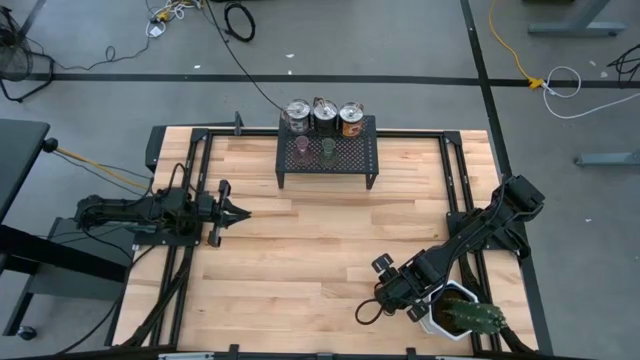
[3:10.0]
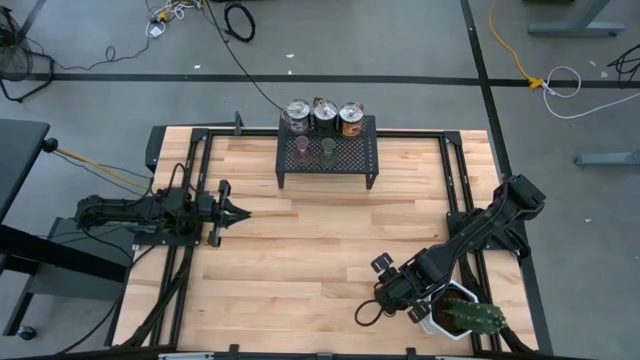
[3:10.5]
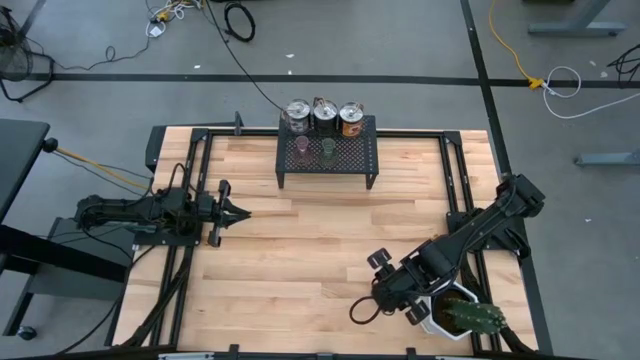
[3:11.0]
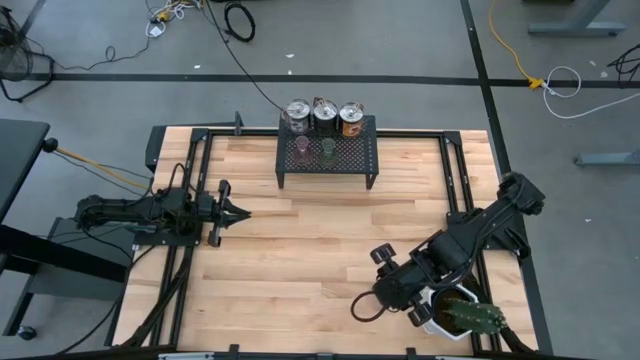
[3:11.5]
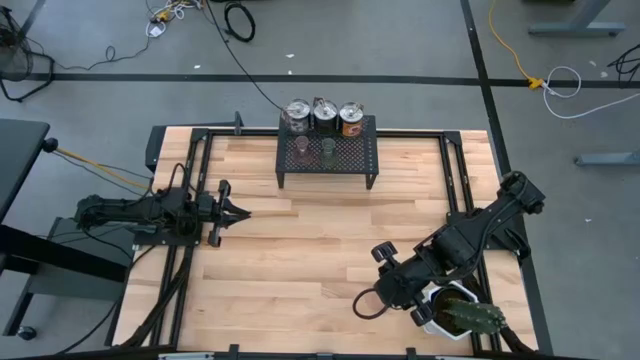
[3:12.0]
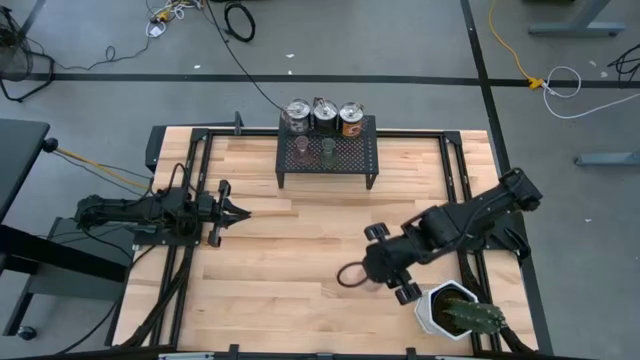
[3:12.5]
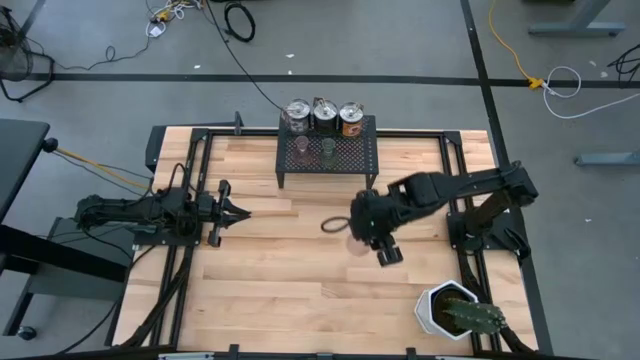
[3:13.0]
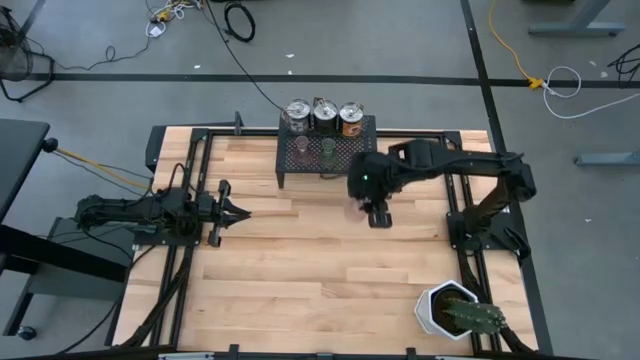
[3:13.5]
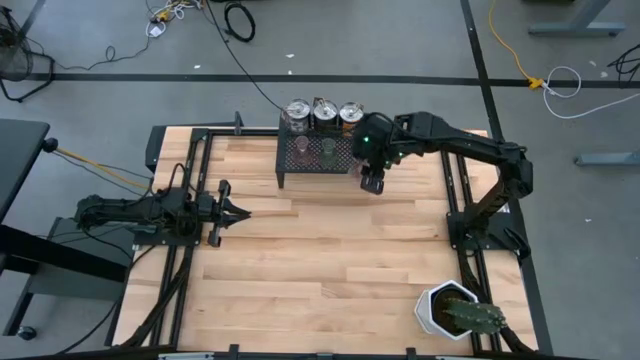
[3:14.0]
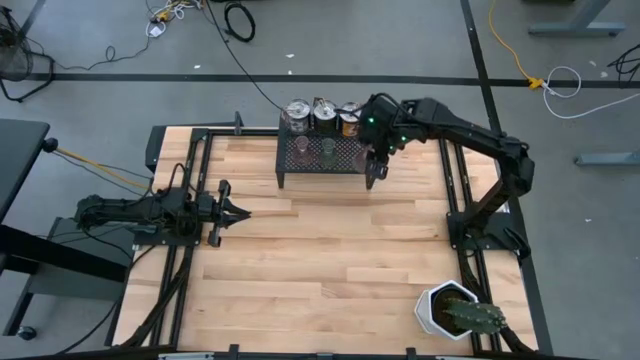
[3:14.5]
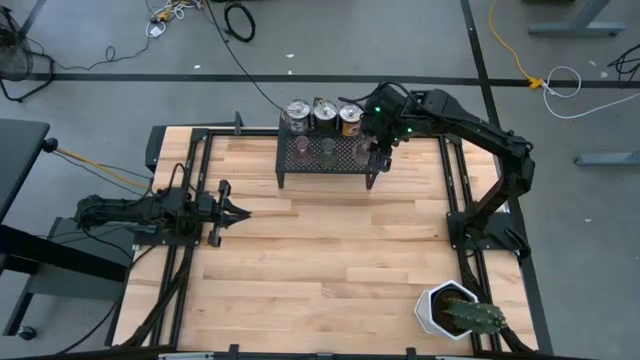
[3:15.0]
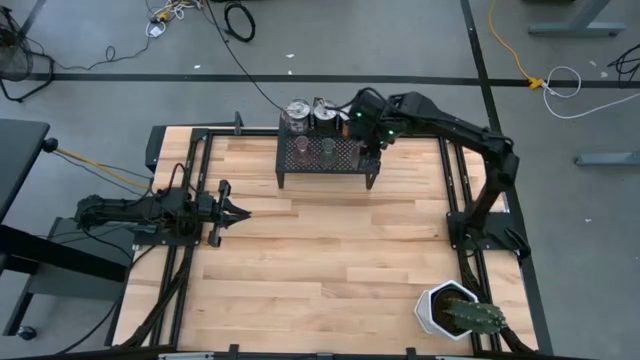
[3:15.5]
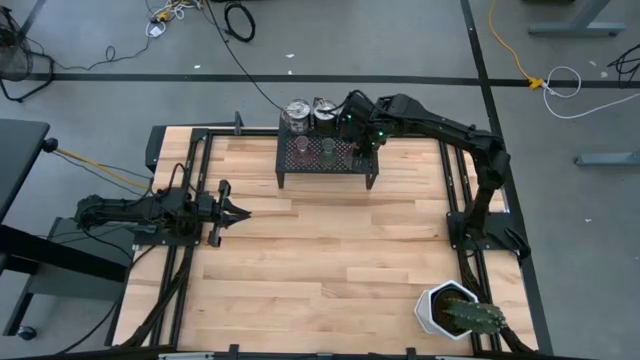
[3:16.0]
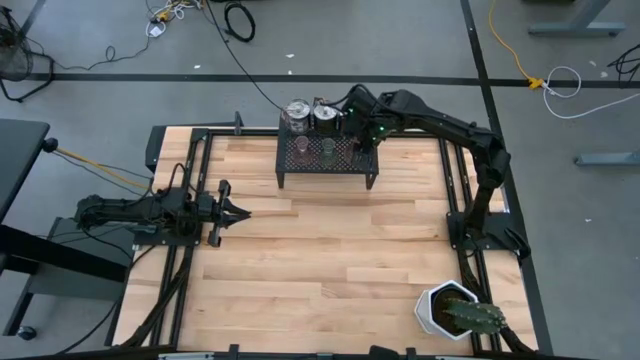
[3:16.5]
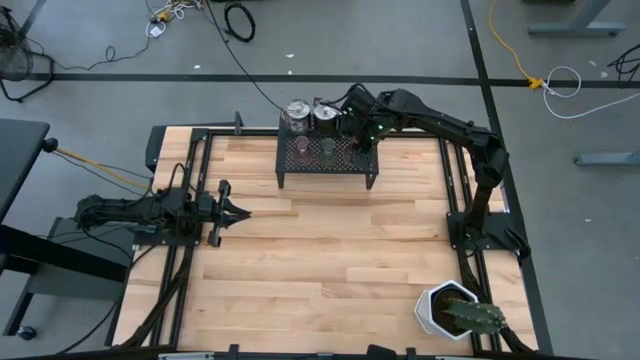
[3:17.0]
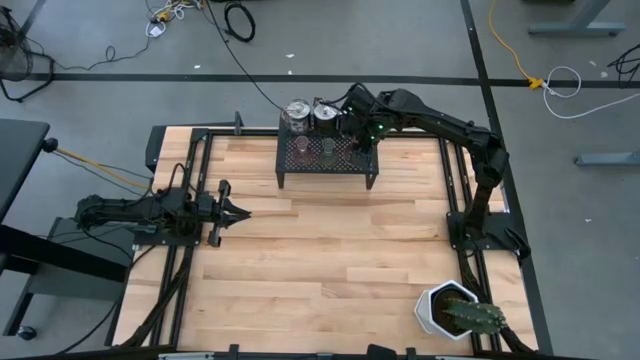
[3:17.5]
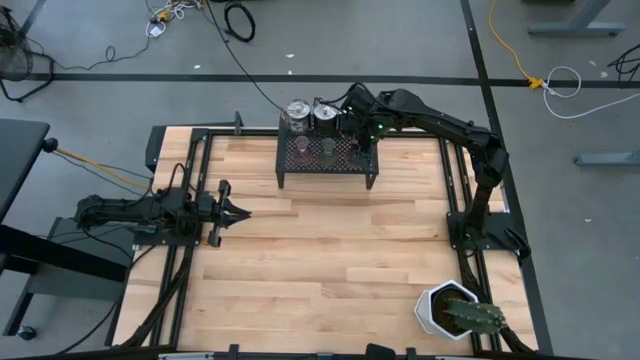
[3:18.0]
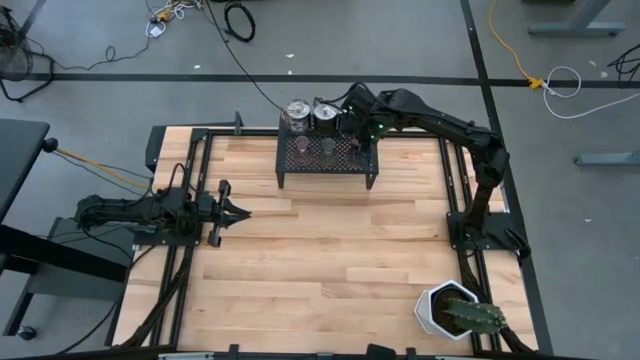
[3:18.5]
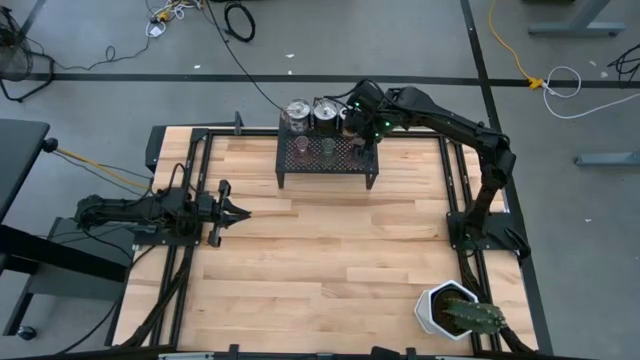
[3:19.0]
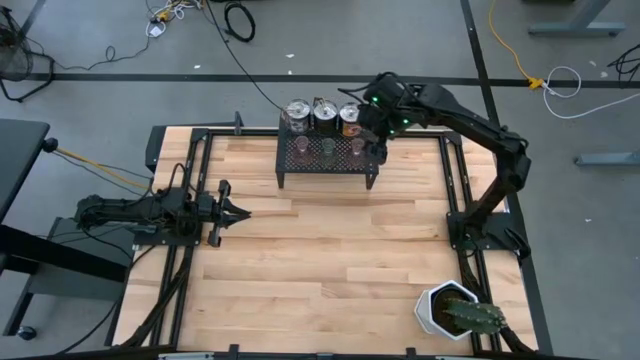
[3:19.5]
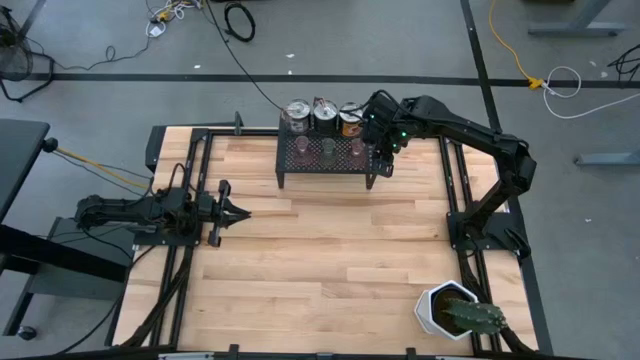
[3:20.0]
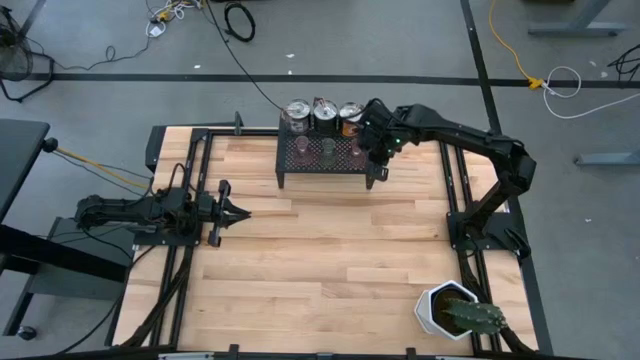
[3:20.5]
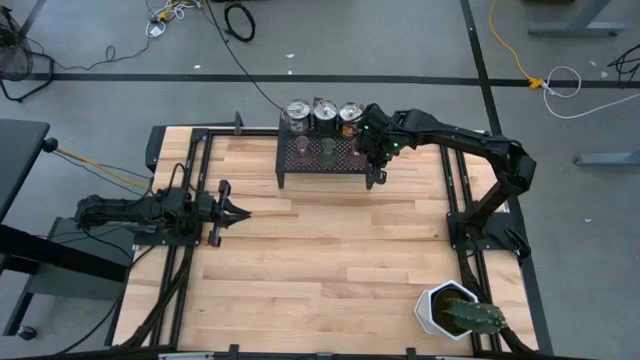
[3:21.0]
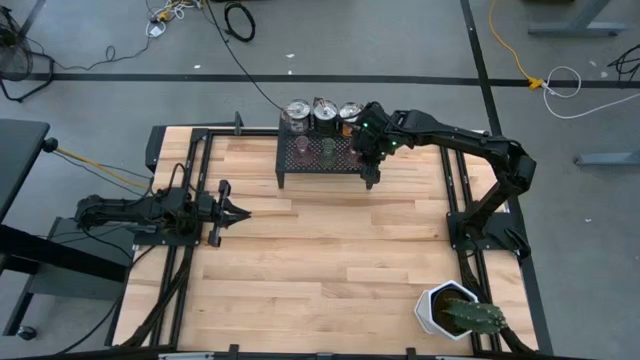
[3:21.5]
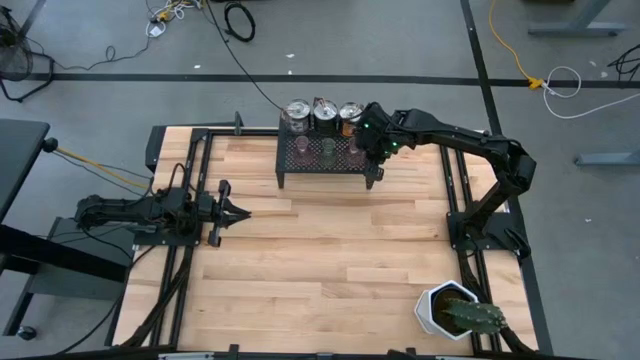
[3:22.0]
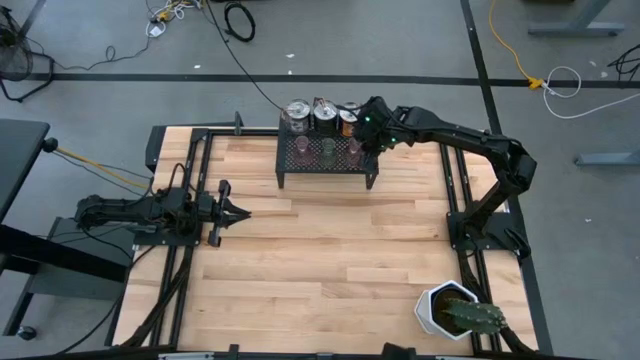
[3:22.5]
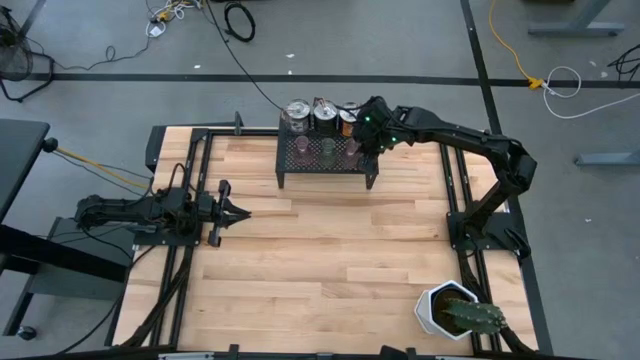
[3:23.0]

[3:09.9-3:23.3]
Task: Pick & Place candle stick holders
Put the pink vase candle holder on the shelf

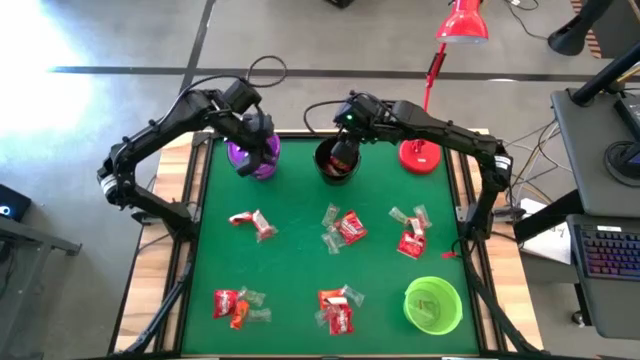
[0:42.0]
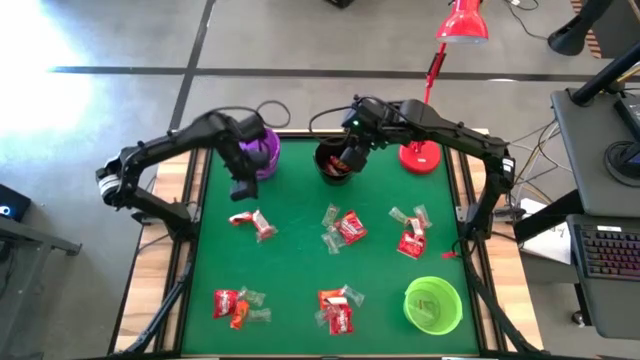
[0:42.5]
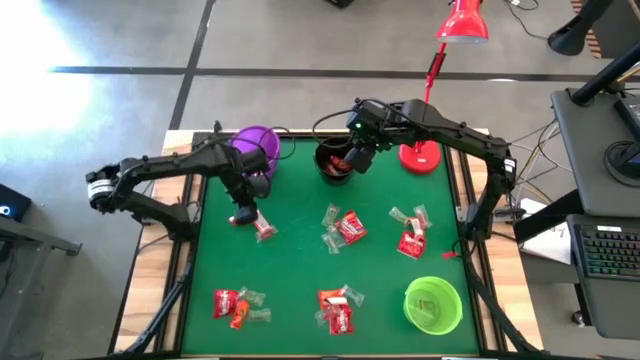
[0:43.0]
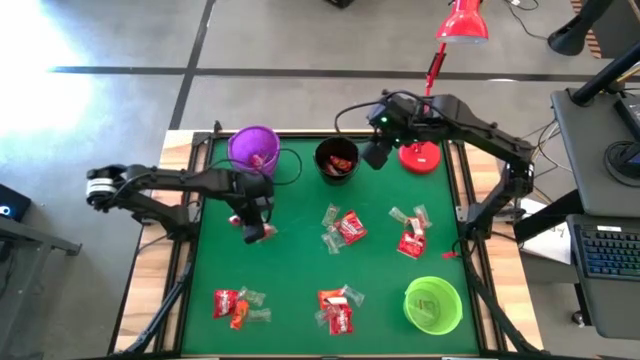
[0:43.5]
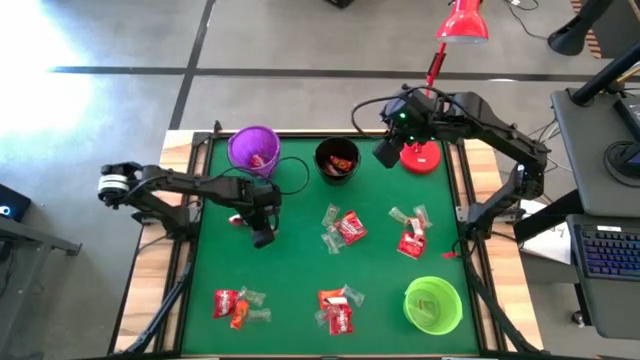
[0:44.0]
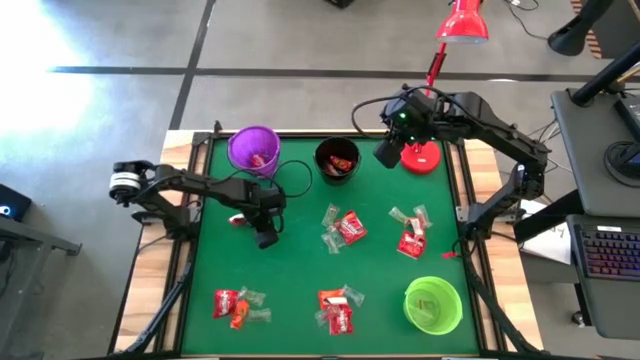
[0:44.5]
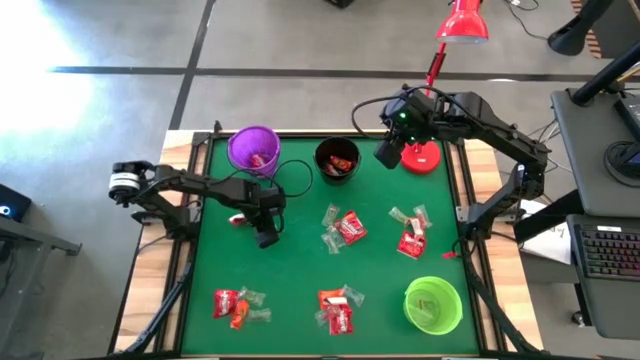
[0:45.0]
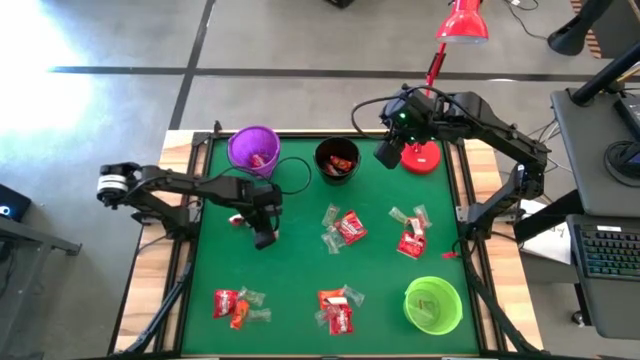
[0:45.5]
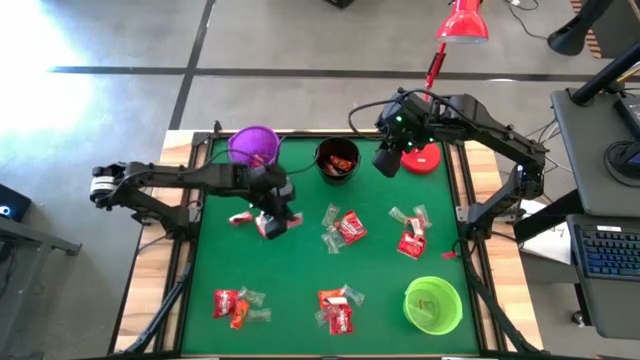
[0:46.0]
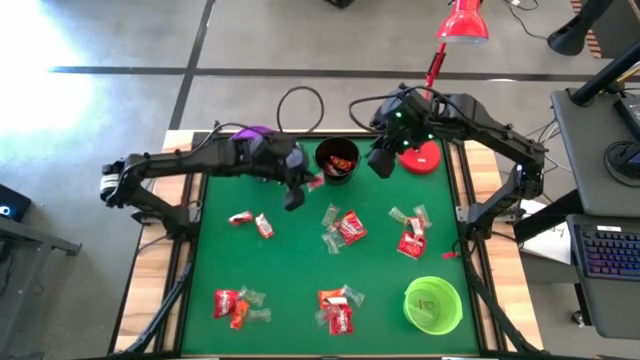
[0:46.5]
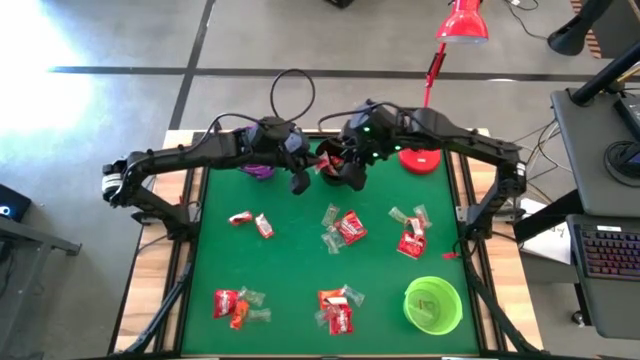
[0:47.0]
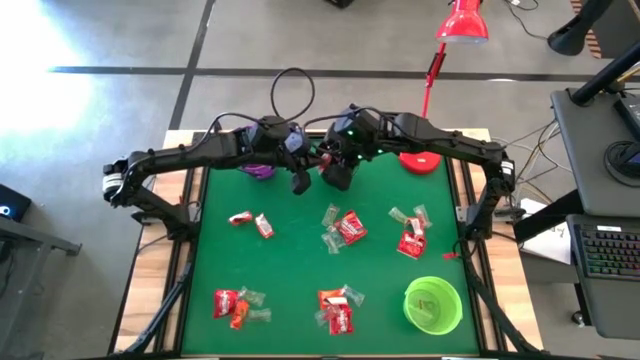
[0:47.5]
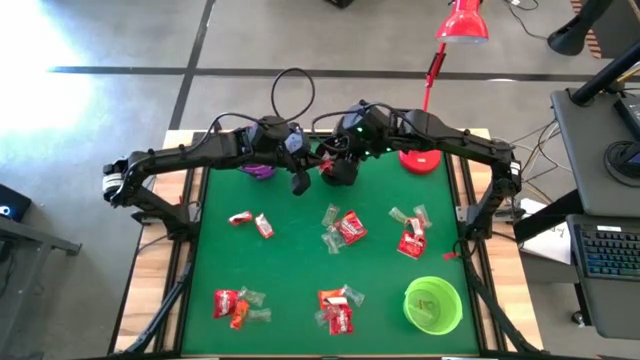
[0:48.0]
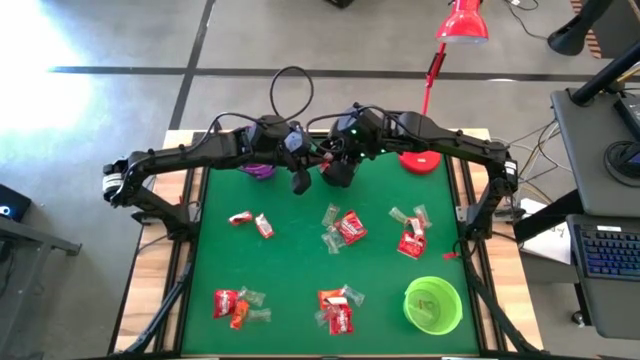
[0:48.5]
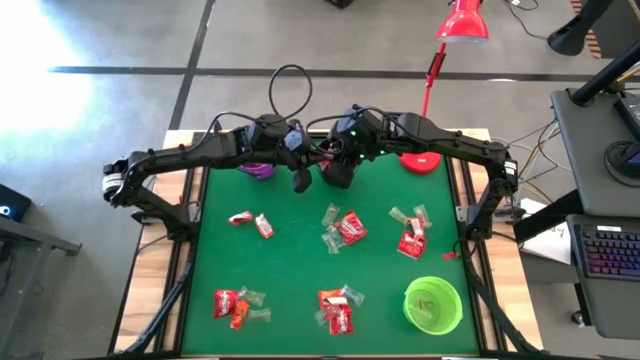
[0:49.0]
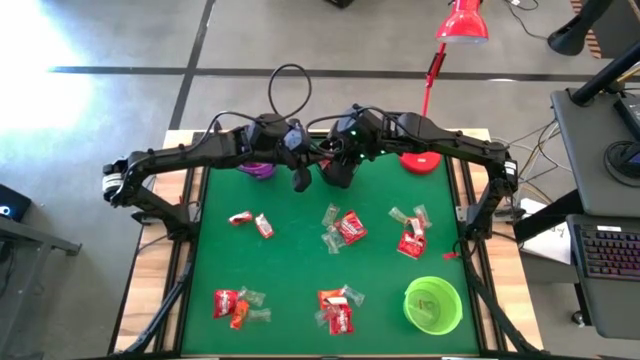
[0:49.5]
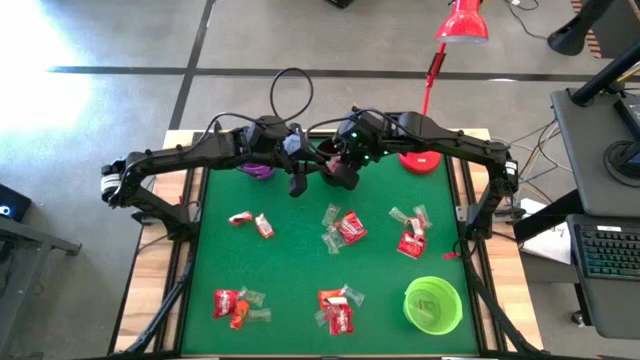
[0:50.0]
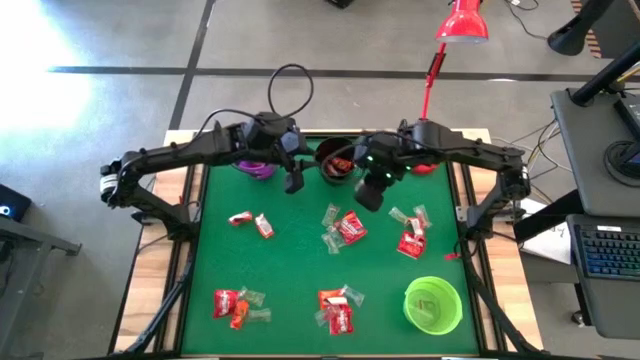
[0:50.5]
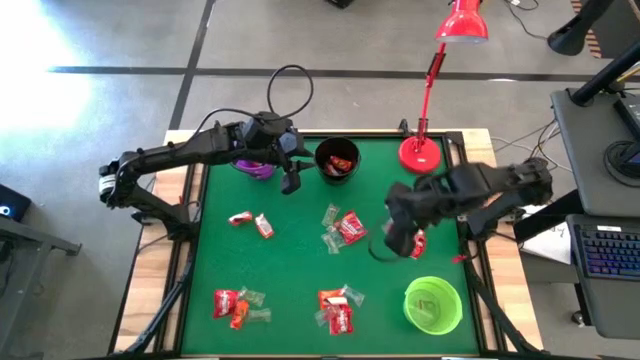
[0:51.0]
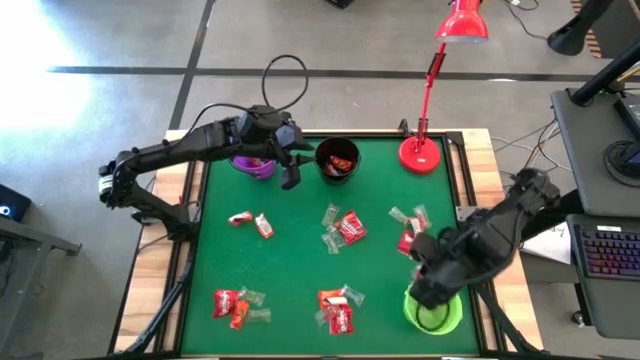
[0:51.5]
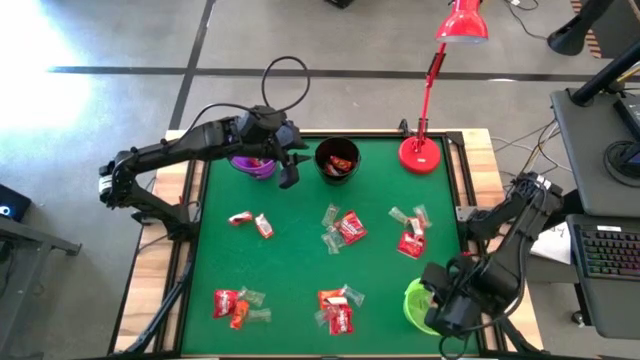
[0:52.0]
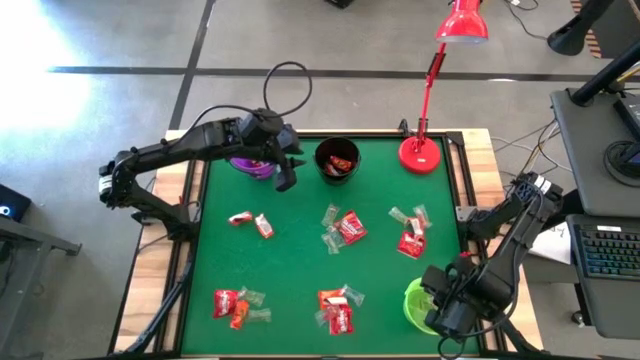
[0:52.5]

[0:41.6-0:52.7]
Task: Sort candy
Put the red gummy into the green bucket
